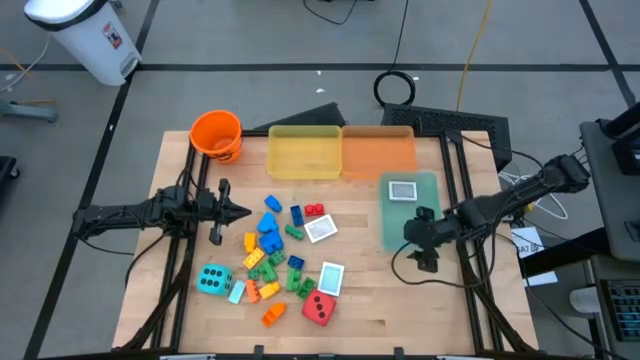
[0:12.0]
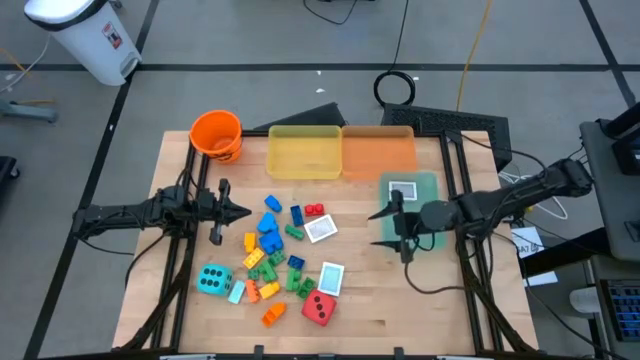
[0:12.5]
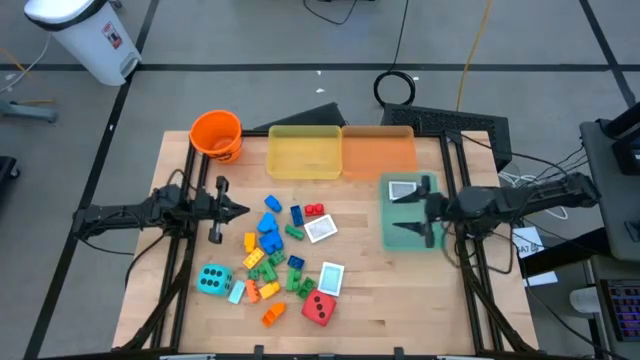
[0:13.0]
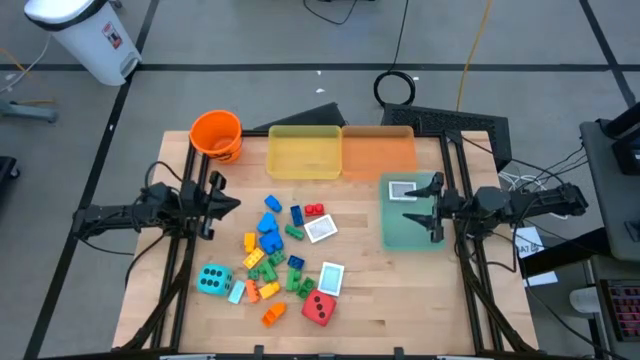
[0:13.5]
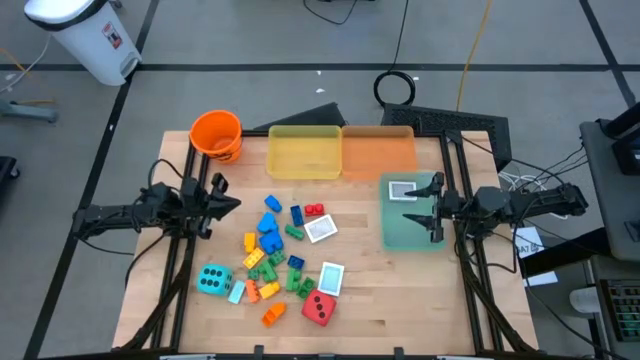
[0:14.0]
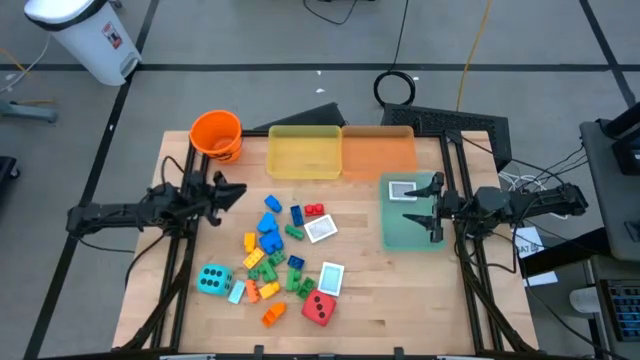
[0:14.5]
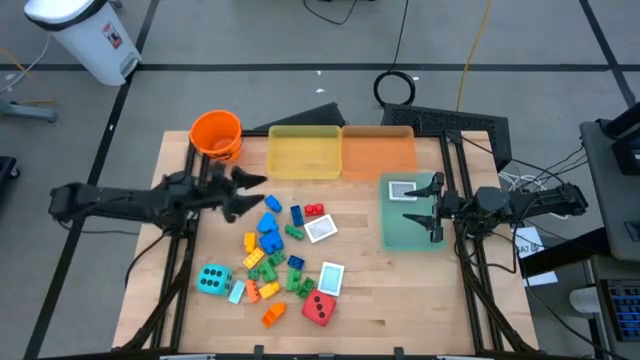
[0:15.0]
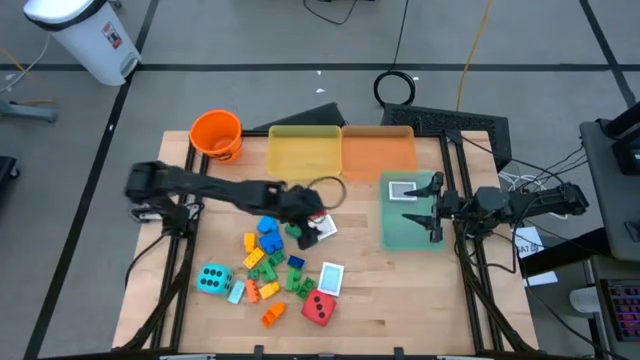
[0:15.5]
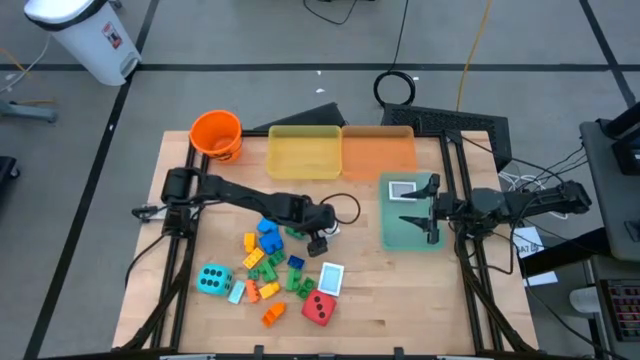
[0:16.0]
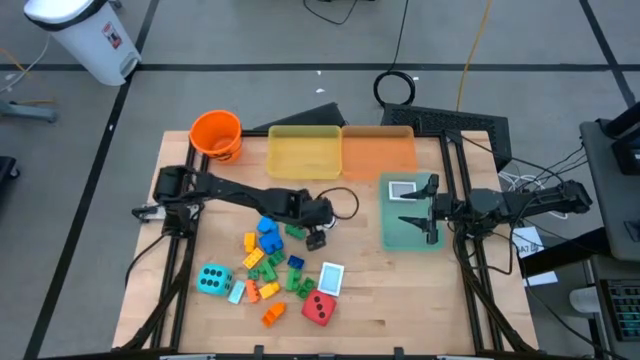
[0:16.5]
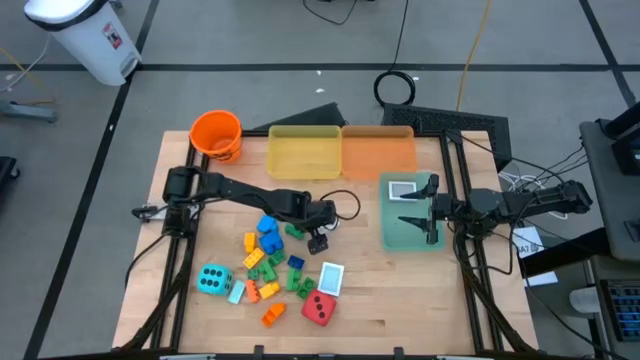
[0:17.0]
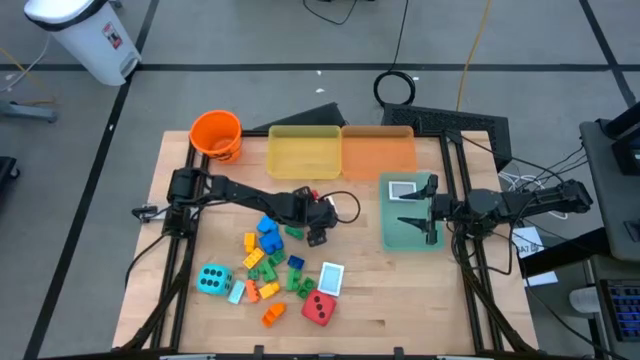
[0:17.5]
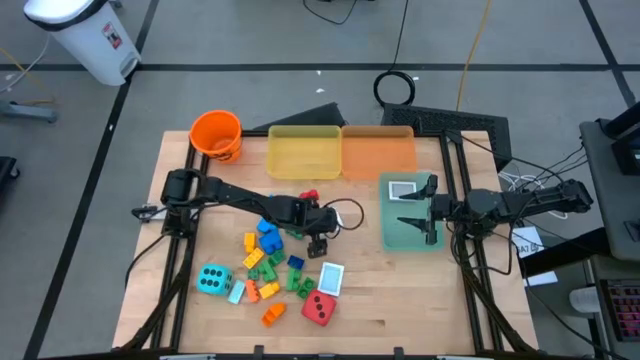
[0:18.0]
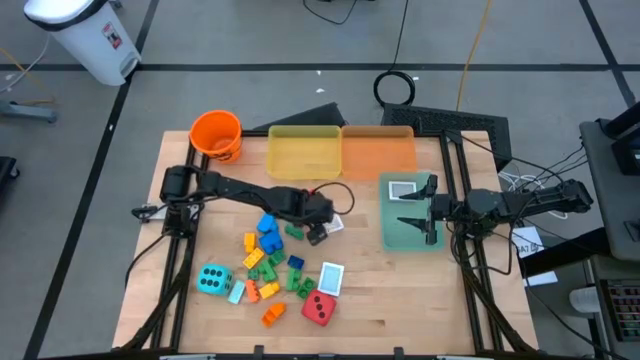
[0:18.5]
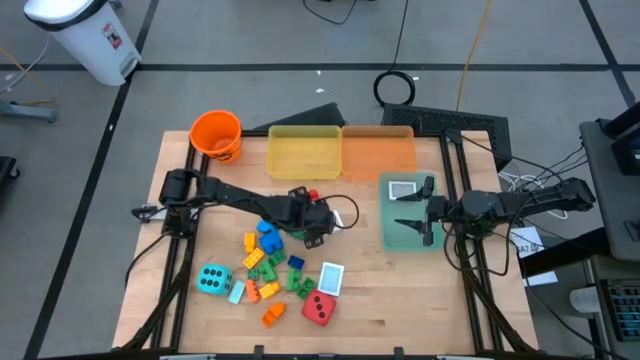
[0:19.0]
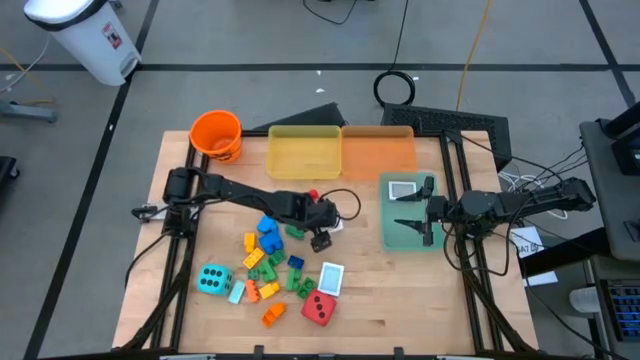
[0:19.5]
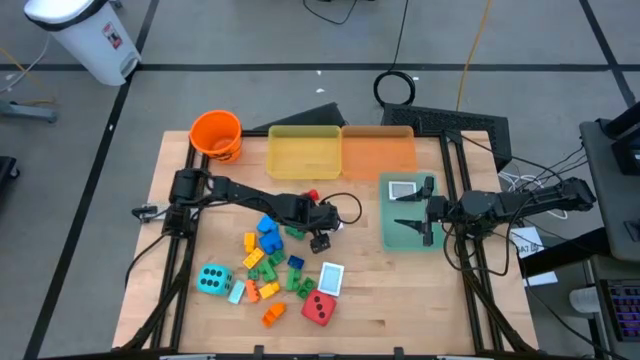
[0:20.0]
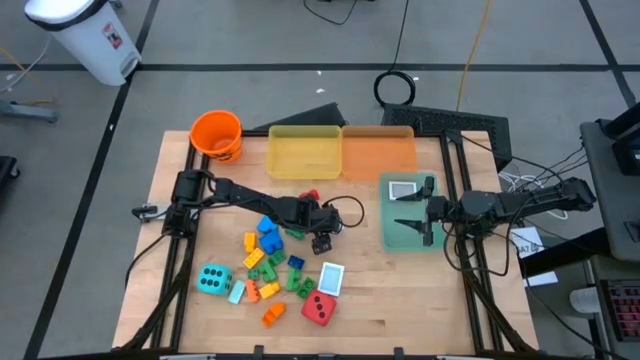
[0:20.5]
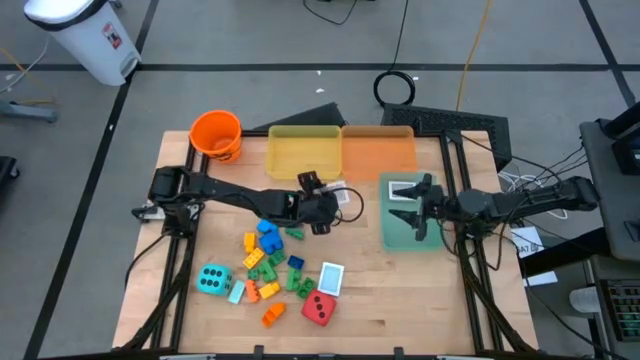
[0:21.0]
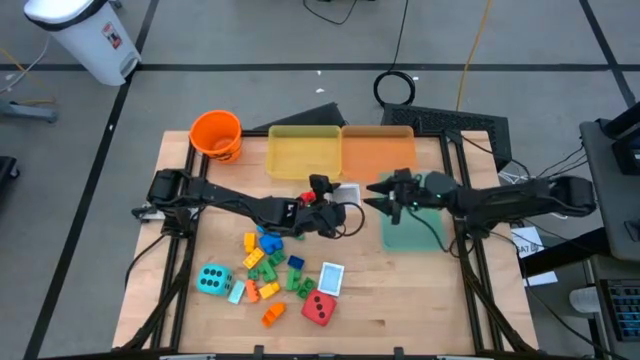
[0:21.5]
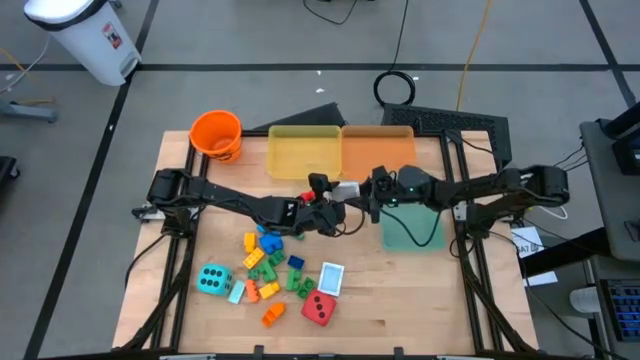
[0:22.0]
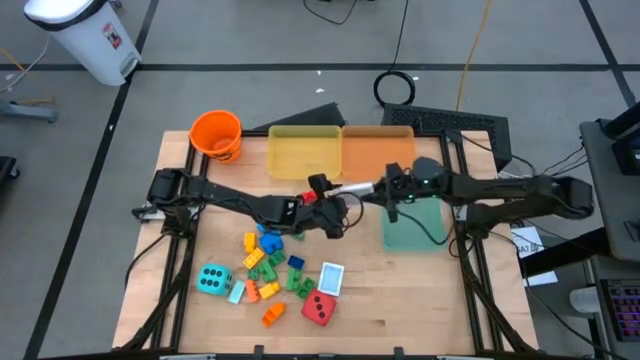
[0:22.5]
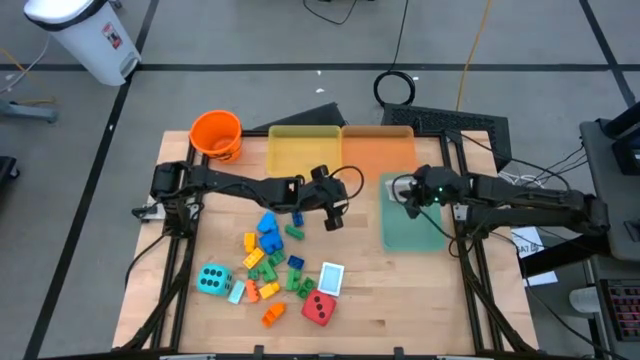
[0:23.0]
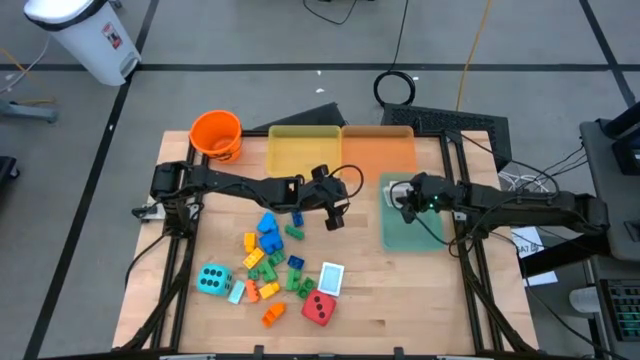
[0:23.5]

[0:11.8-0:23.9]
Task: Pick & Place Toys
Put the brown deck of cards into the blue bin

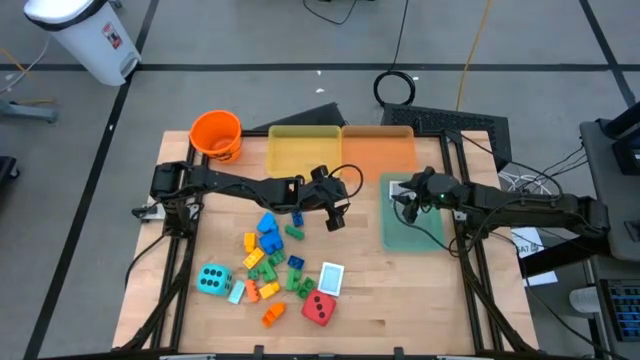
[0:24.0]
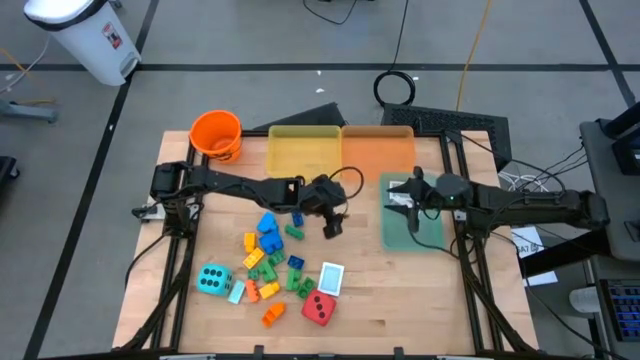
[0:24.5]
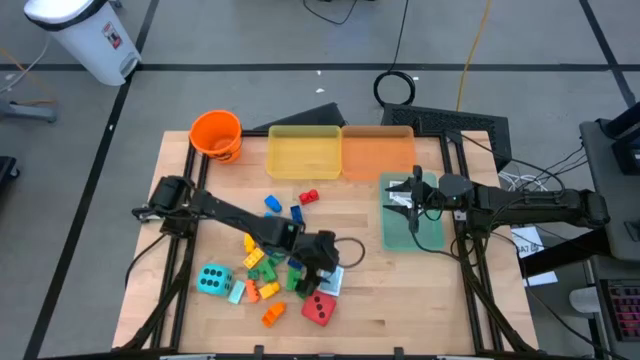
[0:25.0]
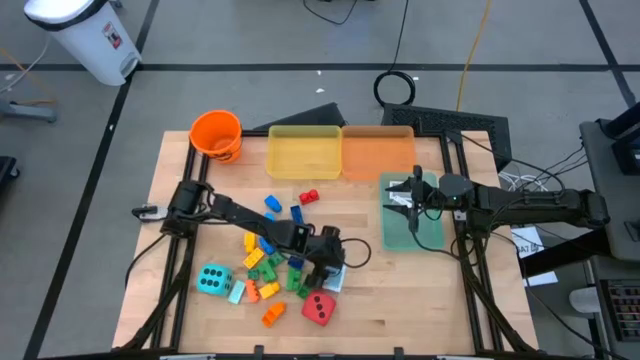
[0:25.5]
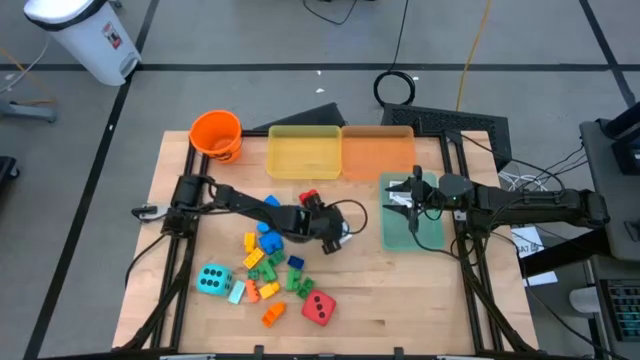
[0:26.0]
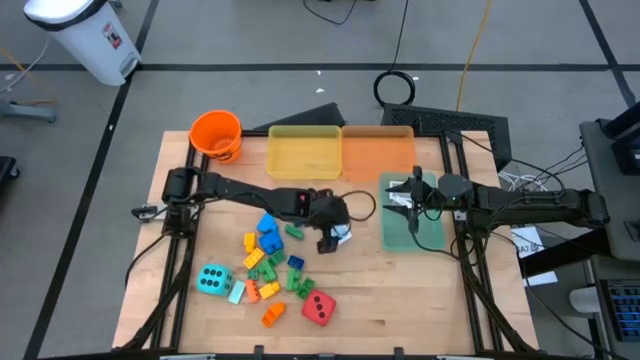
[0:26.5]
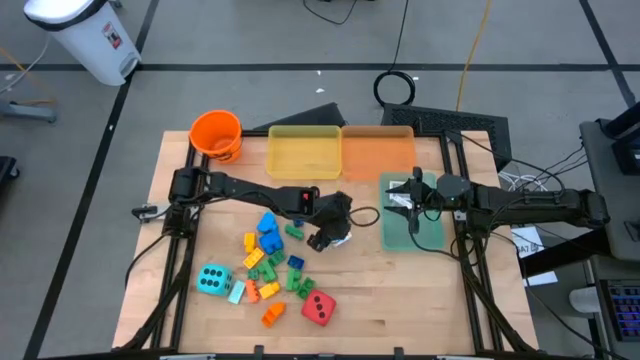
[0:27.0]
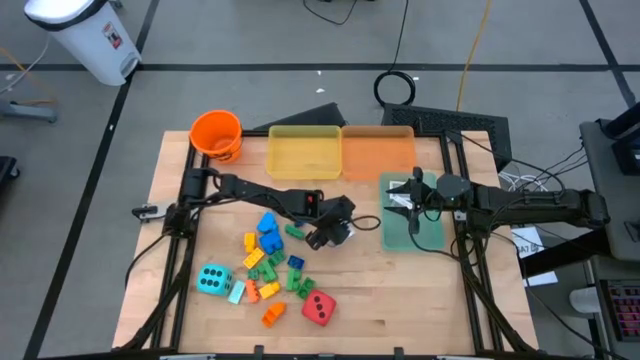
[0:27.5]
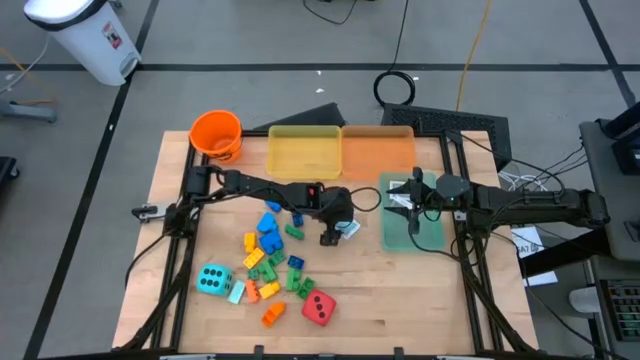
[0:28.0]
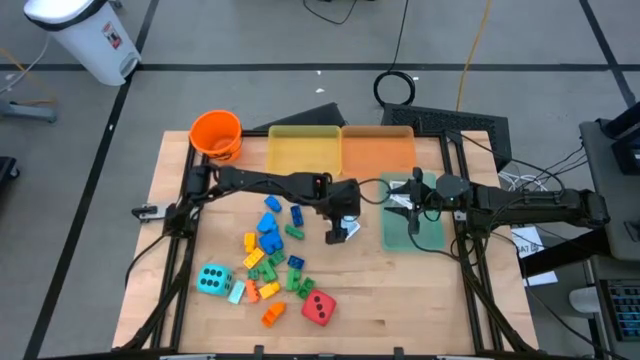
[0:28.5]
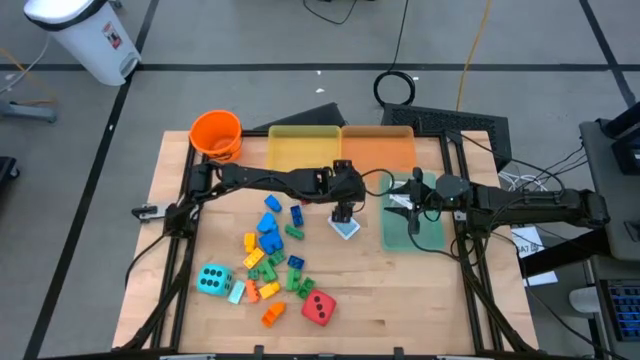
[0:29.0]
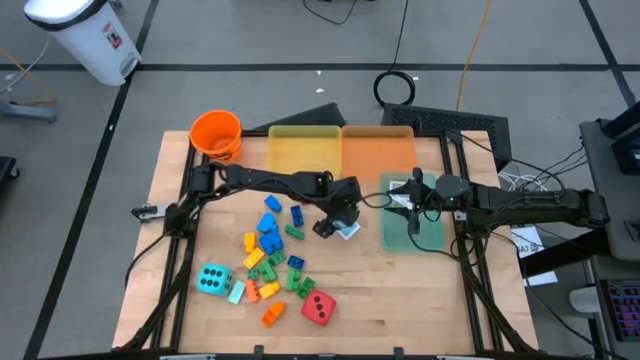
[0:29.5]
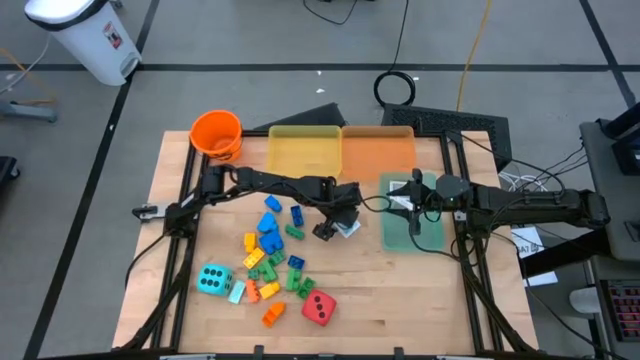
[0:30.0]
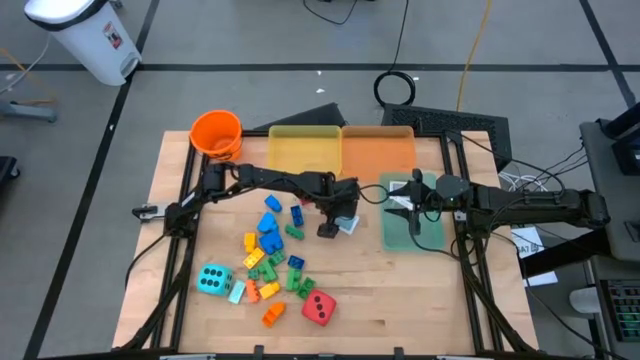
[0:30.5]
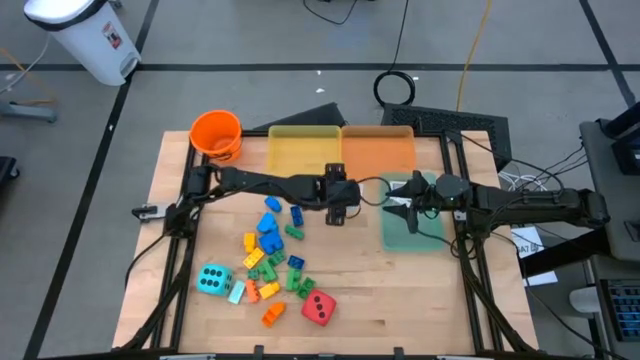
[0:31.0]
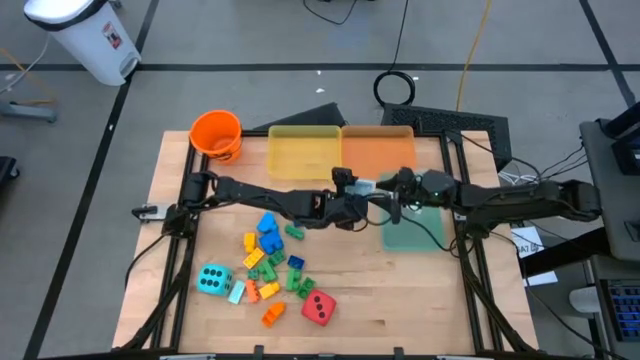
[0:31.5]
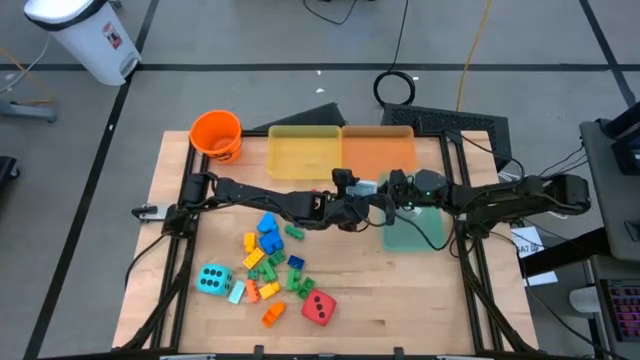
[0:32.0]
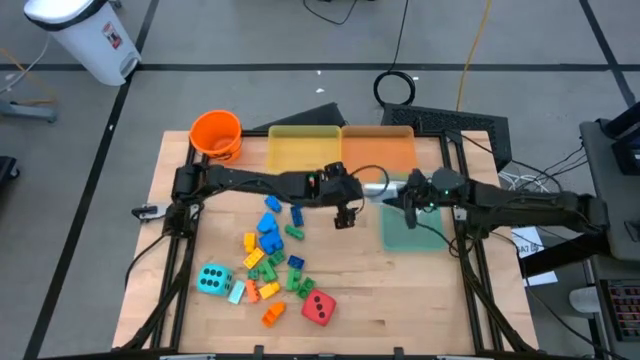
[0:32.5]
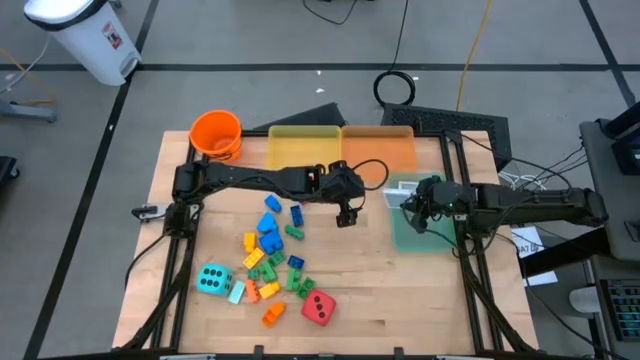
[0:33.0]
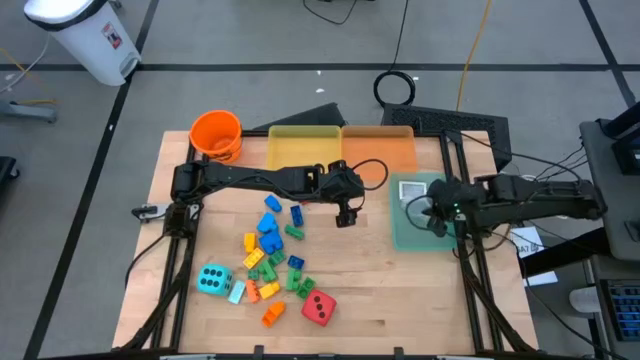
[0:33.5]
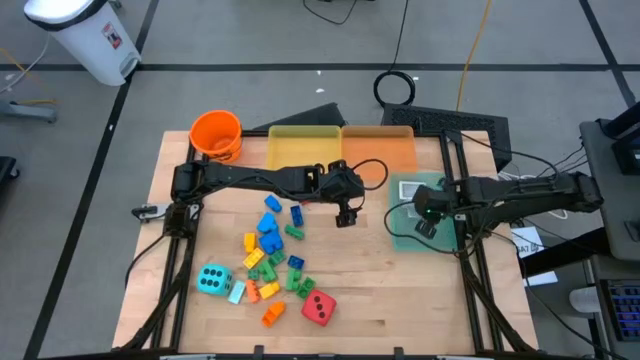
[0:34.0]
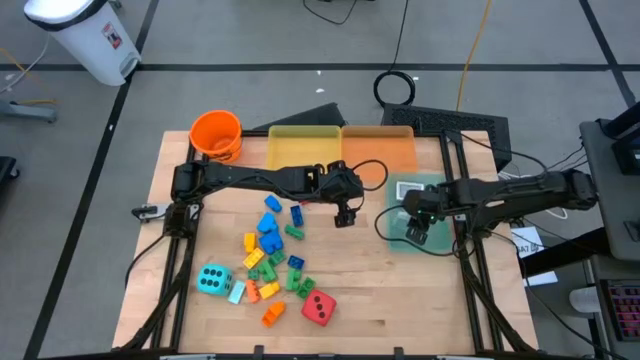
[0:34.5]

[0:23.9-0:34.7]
Put the blue deck of cards into the blue bin
